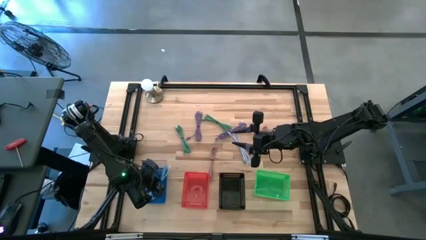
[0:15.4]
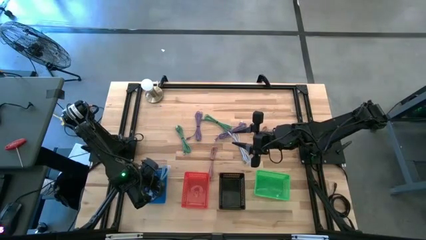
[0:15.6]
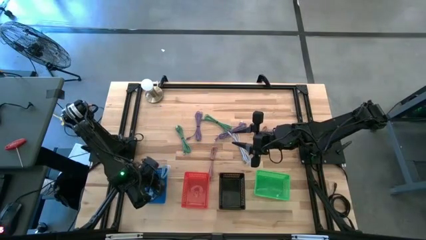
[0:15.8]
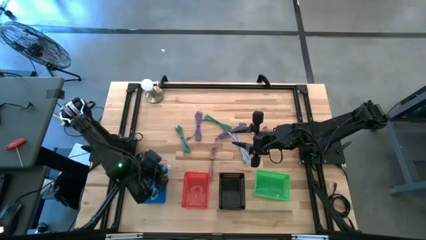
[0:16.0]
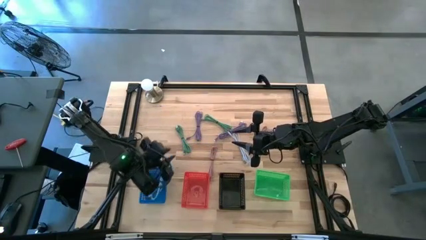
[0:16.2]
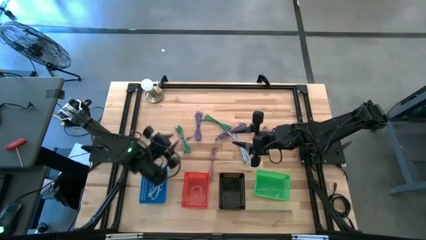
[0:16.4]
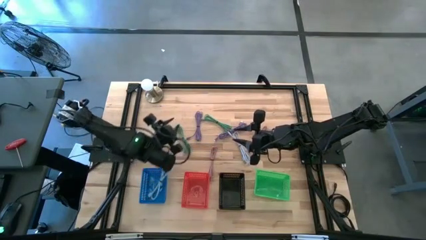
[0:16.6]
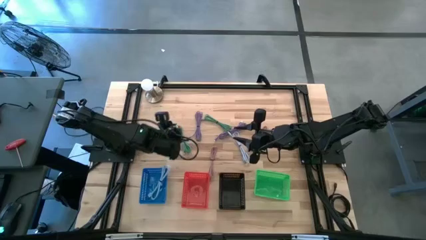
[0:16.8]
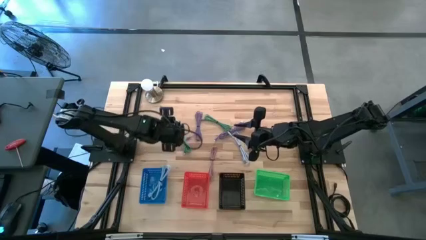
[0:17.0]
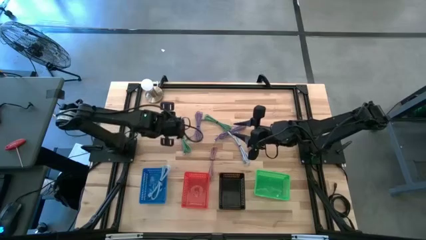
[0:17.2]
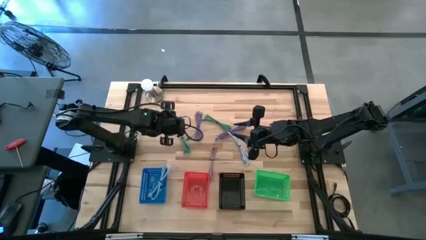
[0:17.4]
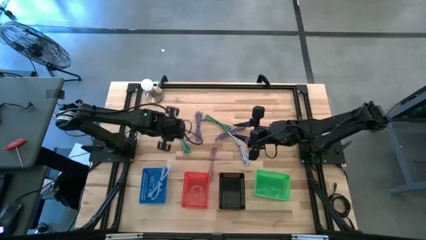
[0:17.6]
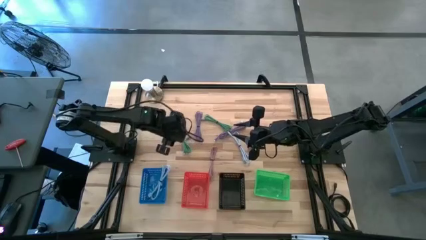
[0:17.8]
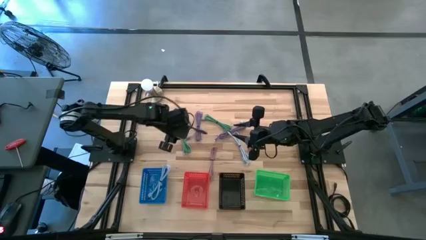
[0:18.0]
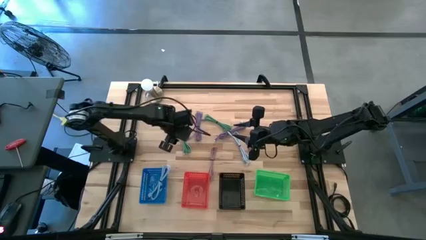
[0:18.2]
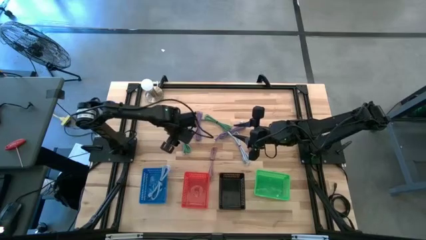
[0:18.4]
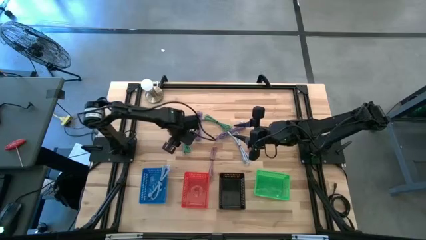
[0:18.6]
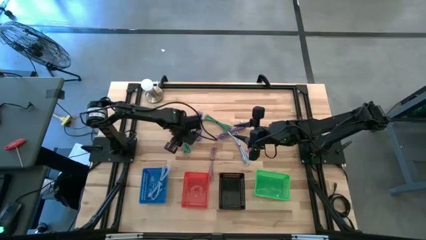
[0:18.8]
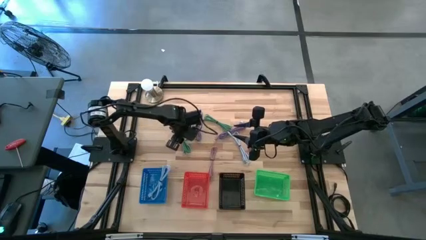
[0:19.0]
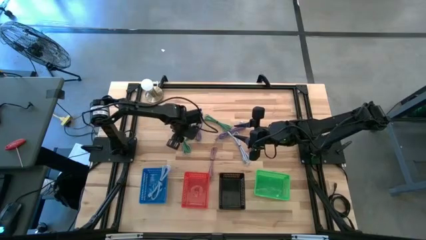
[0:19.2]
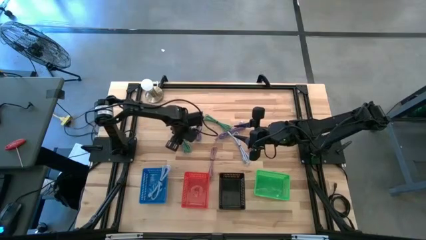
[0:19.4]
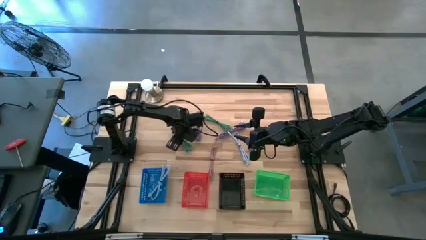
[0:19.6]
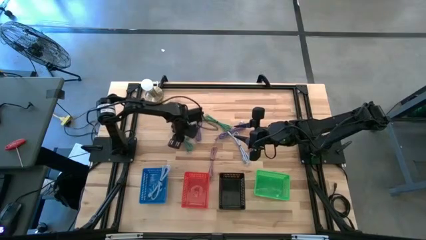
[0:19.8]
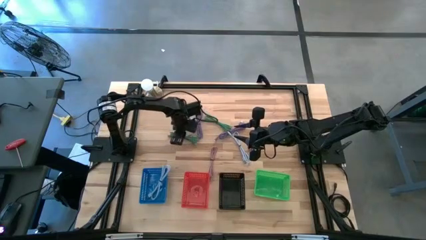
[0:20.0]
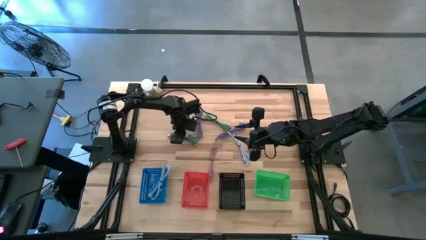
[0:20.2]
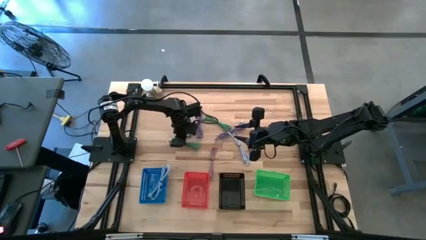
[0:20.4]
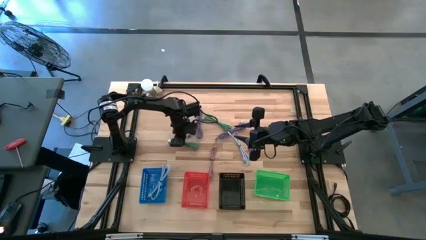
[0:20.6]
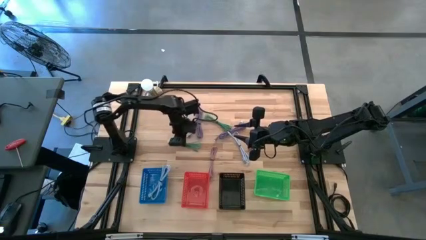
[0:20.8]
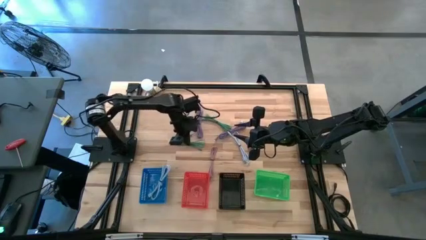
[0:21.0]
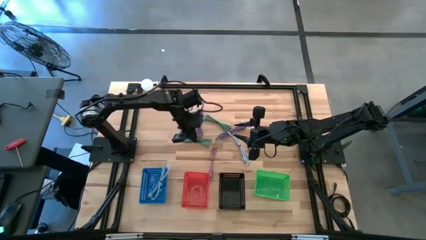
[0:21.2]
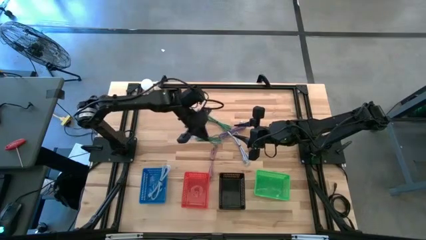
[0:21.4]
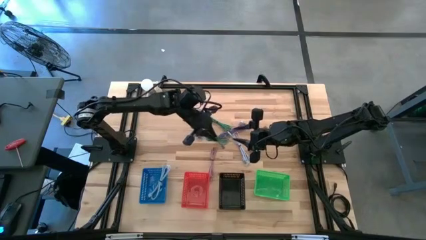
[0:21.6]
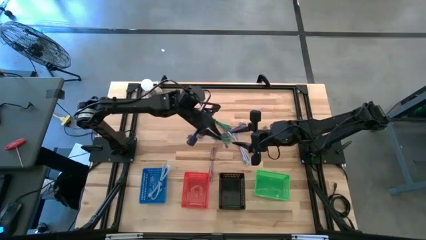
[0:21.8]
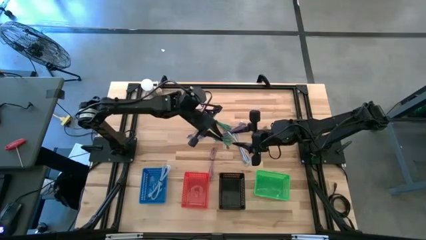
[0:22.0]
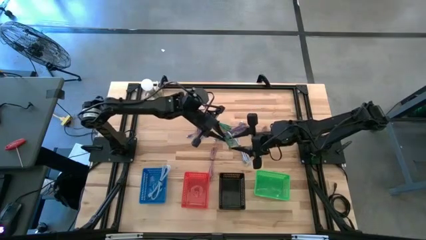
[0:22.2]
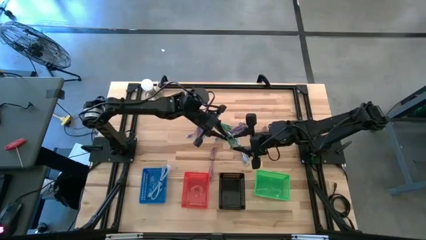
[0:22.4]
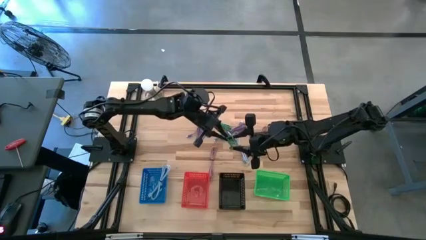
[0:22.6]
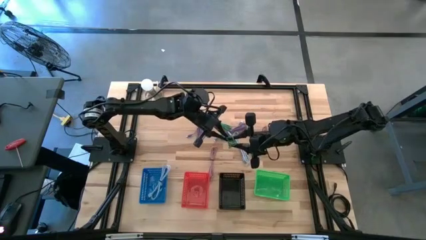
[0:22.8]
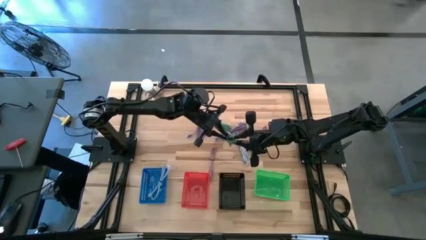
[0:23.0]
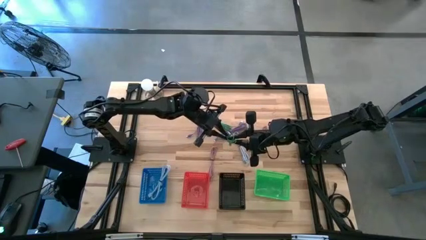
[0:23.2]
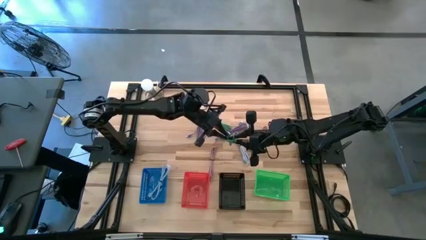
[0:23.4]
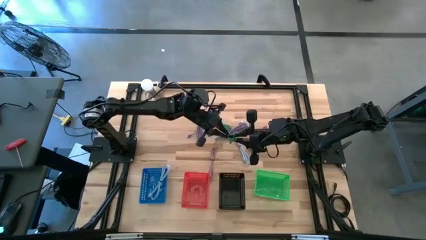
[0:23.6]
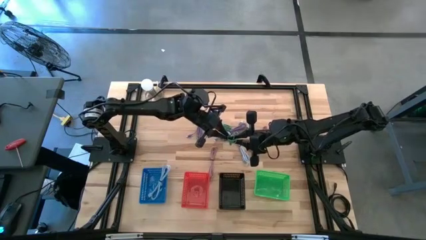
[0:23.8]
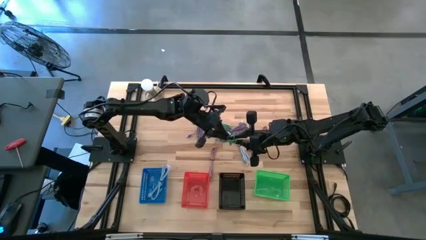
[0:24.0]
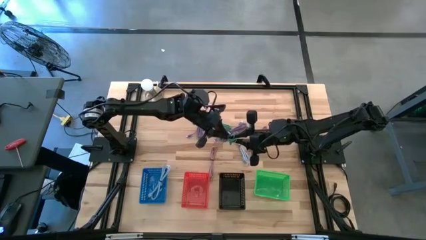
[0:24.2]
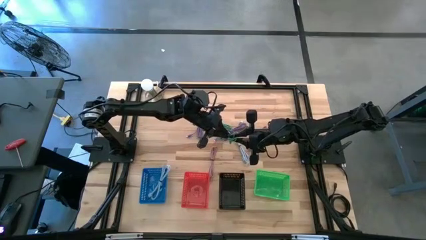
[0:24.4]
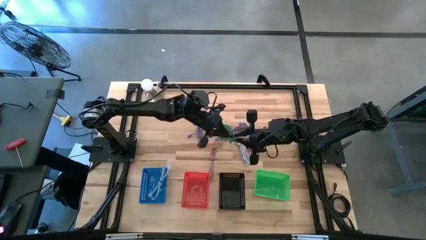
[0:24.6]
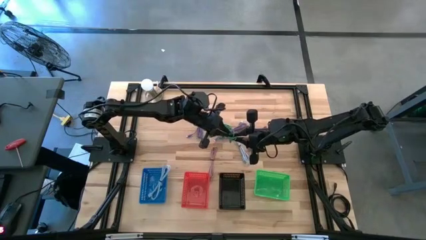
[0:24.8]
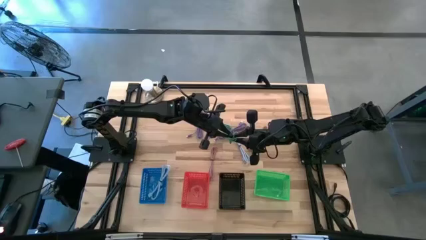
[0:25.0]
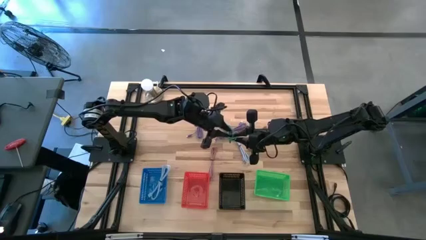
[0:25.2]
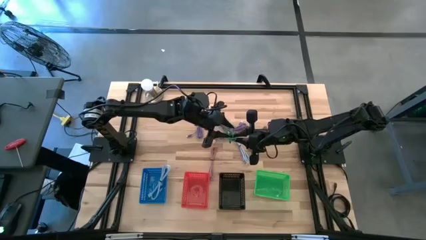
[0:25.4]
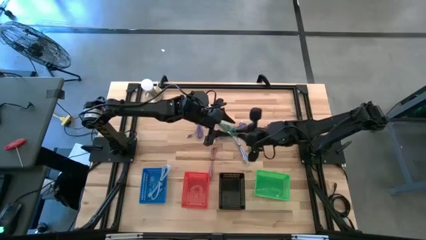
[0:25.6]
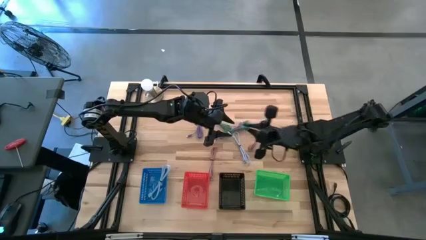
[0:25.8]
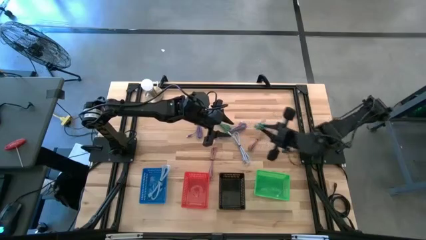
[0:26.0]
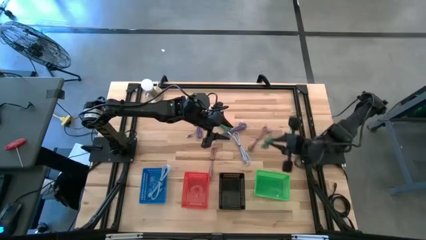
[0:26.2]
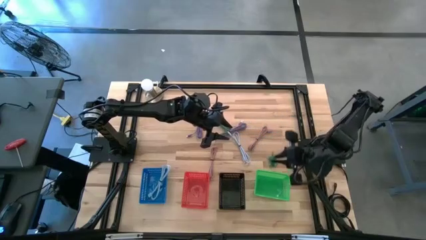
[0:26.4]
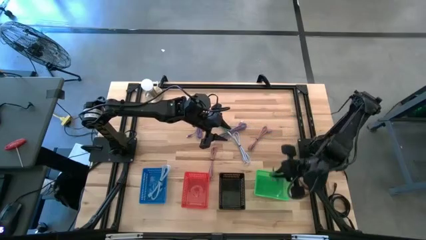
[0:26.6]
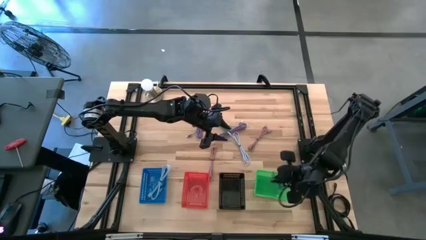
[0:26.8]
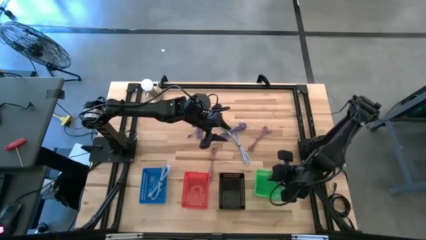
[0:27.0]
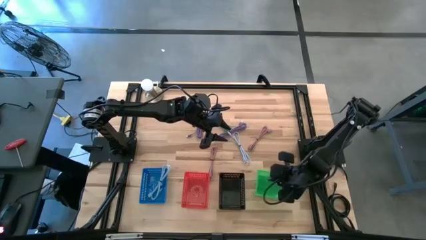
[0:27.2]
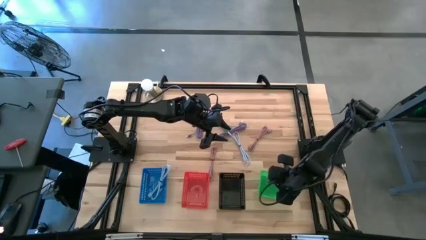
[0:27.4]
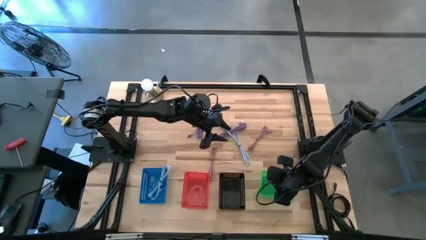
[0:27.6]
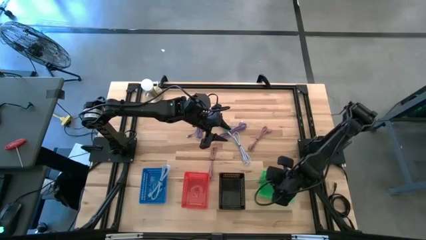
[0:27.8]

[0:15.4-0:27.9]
Task: Pick & Place USB Port
Put the left green charger cable into the green bin

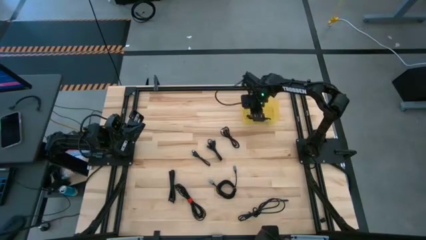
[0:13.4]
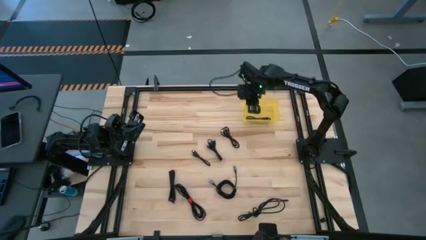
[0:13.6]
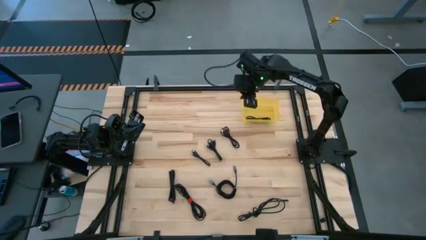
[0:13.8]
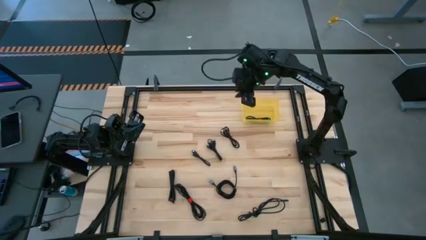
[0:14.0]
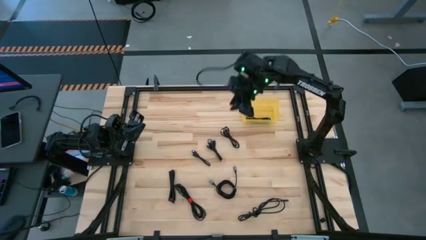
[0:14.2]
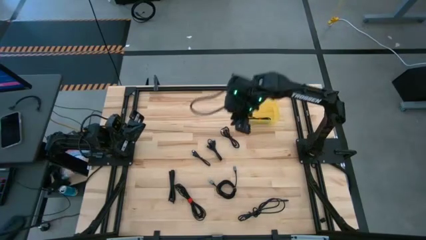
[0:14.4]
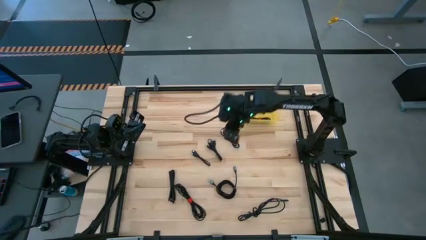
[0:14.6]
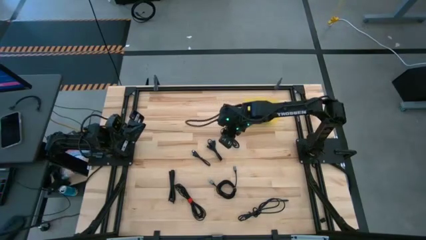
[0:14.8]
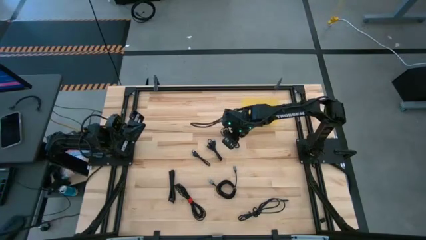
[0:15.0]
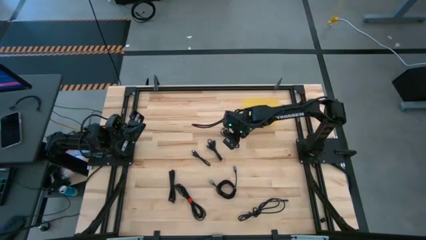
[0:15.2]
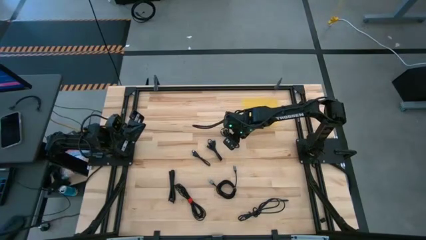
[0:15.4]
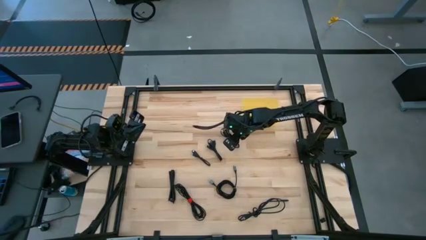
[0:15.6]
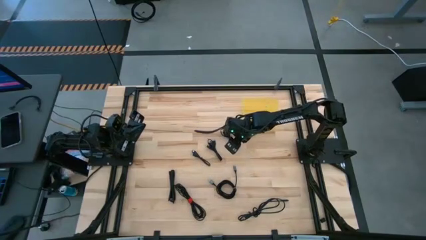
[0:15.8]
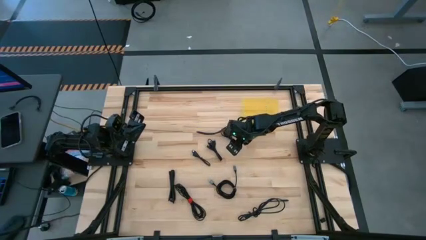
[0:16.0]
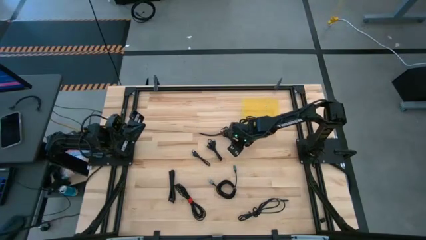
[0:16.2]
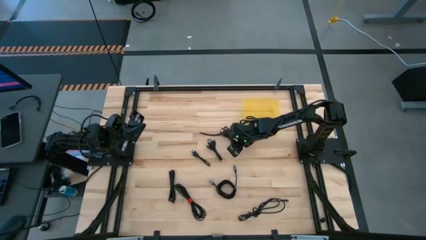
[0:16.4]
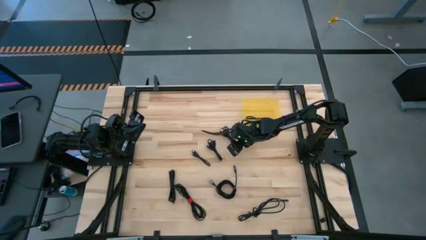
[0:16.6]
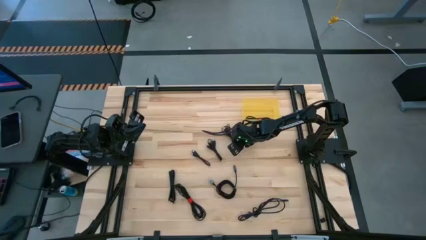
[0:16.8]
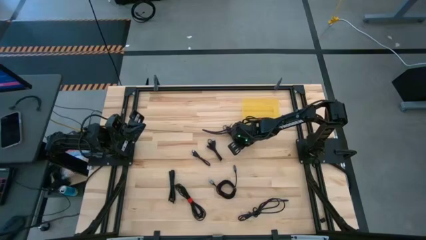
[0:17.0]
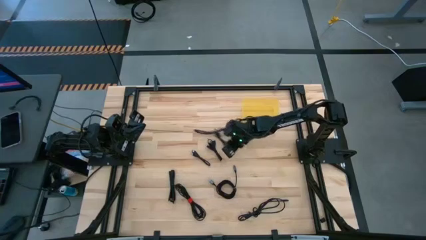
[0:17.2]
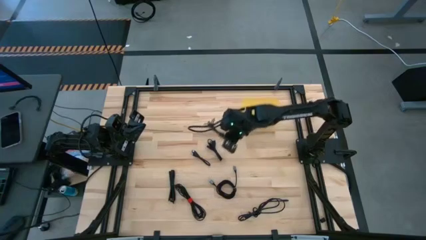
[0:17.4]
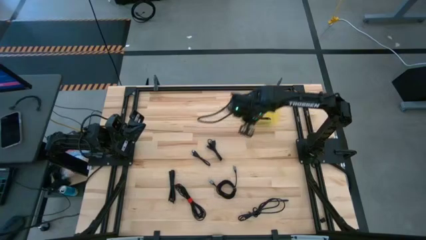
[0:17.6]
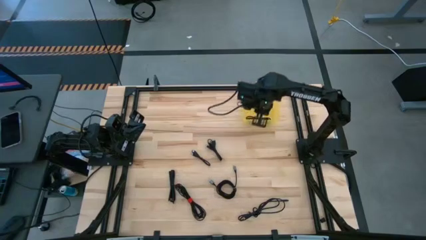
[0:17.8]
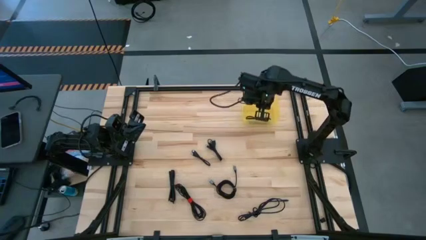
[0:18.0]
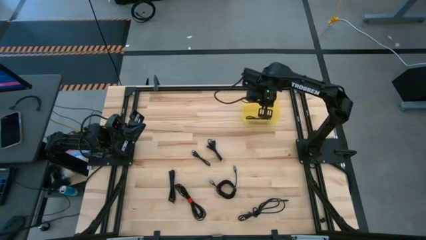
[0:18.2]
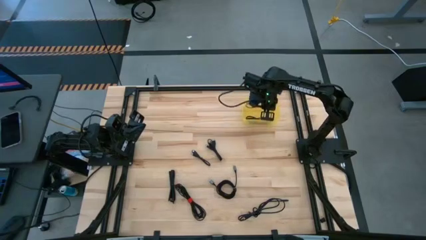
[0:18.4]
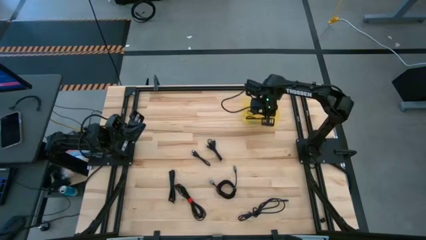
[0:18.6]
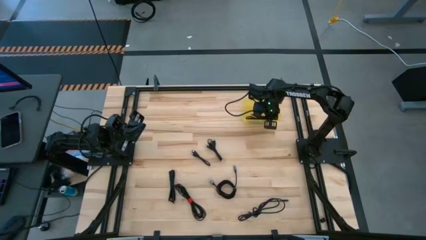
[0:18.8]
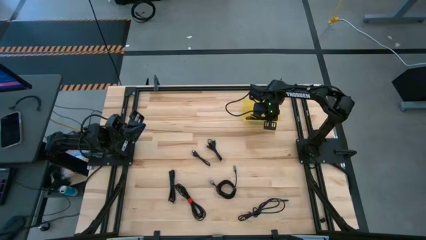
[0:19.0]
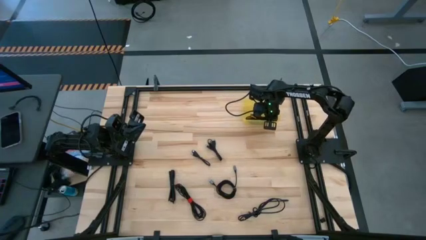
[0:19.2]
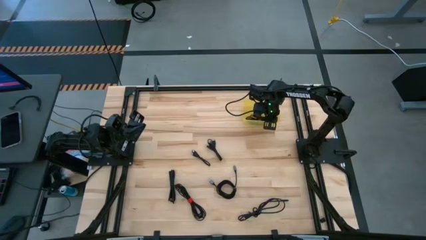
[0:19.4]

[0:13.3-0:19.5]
Task: Pick and place USB-C Cables
Put the black charger cable into the yellow bin
